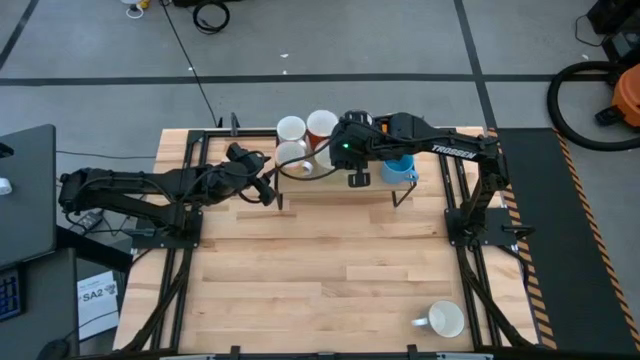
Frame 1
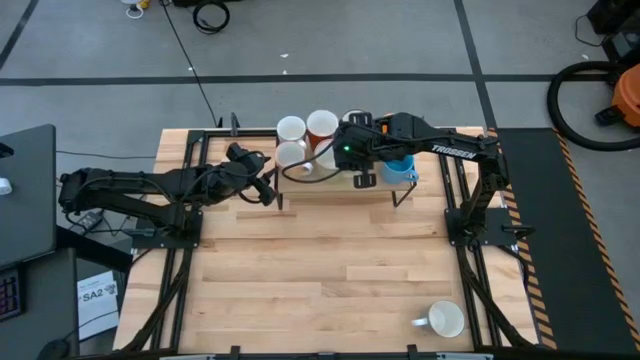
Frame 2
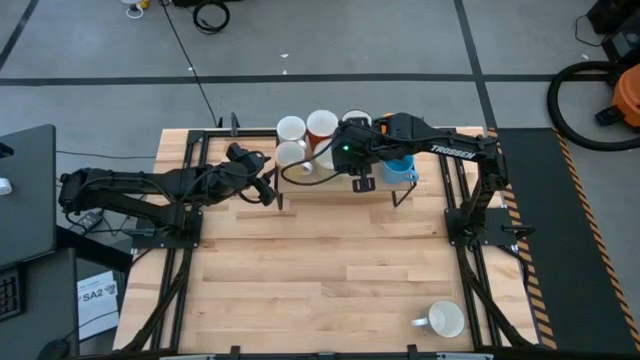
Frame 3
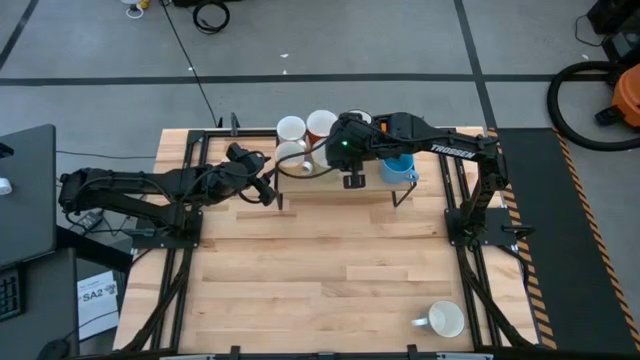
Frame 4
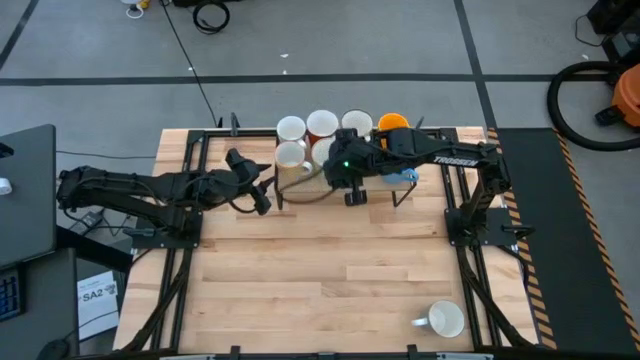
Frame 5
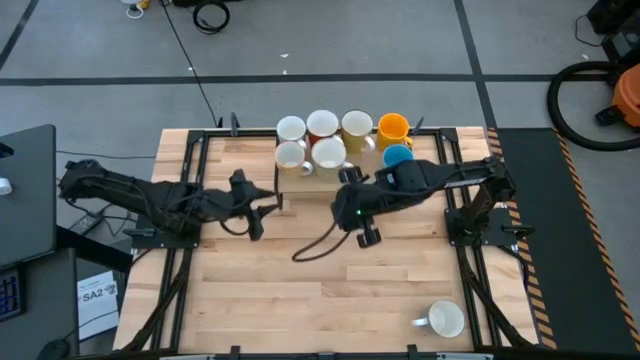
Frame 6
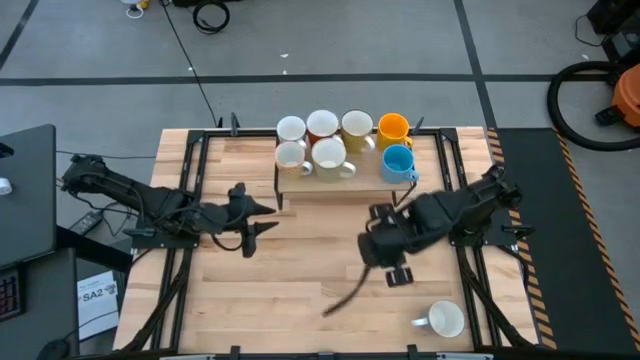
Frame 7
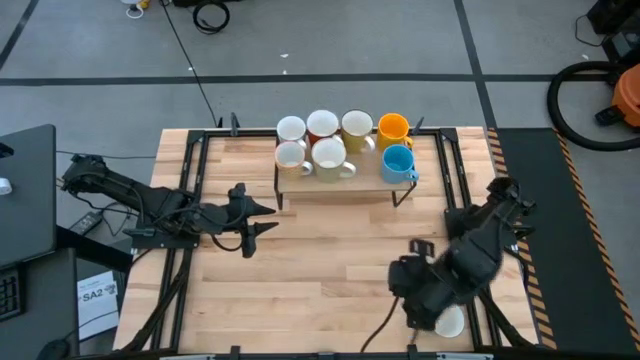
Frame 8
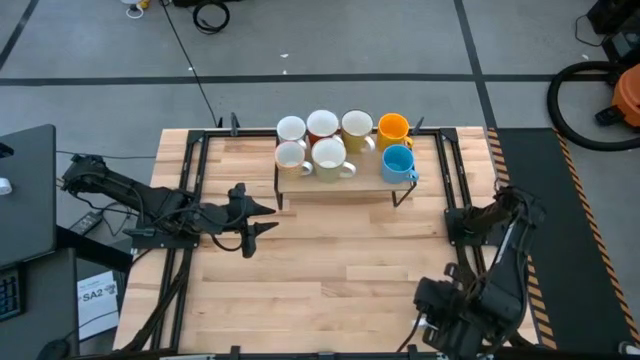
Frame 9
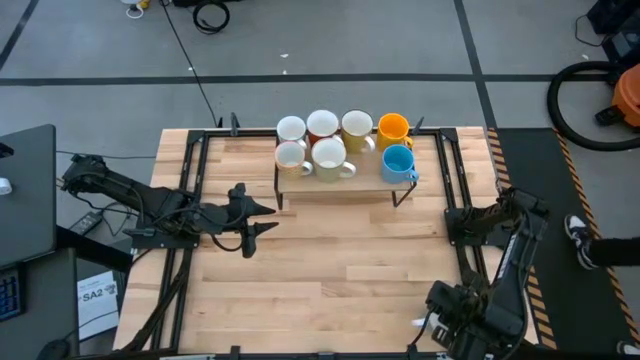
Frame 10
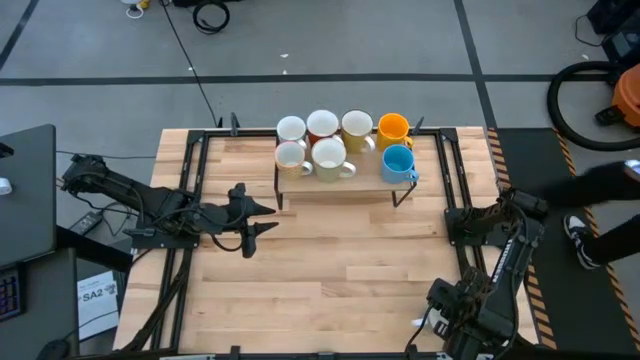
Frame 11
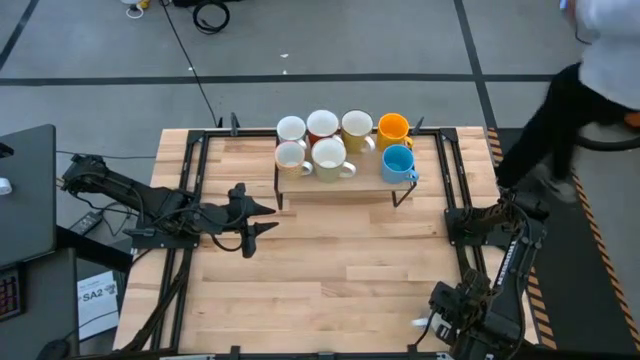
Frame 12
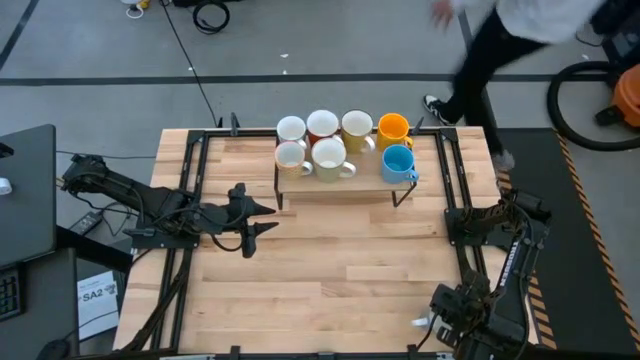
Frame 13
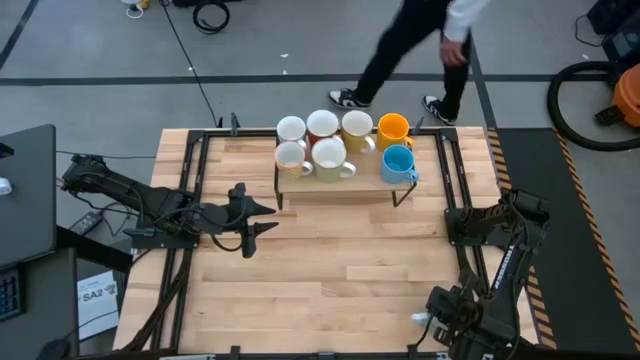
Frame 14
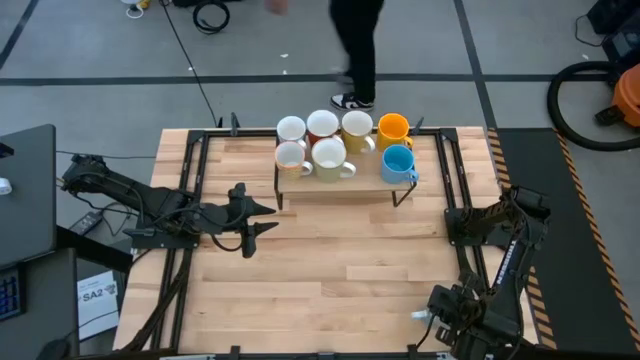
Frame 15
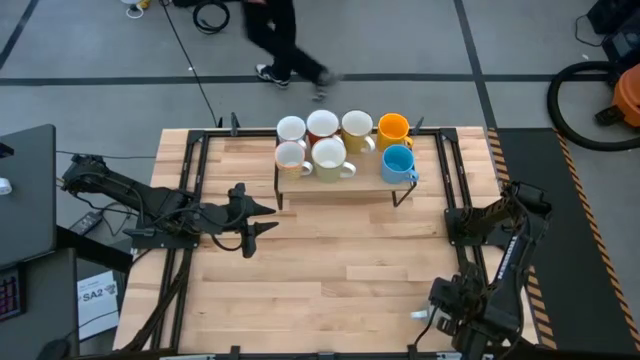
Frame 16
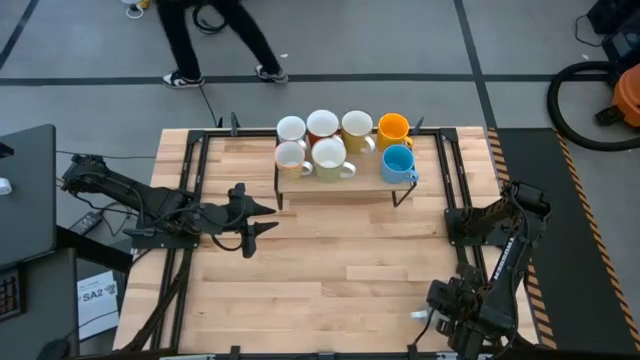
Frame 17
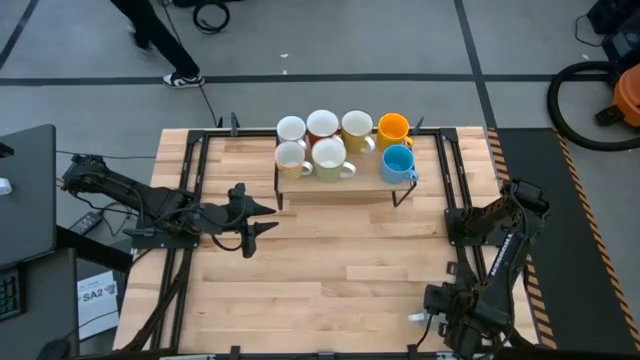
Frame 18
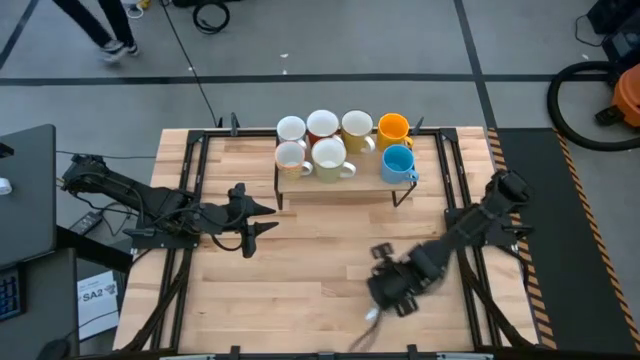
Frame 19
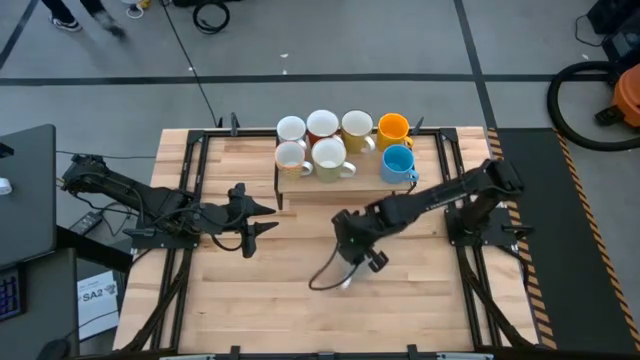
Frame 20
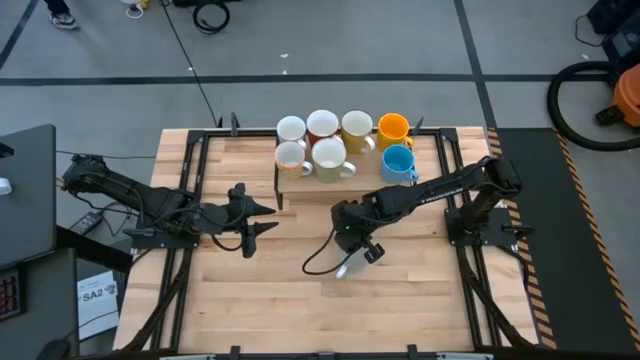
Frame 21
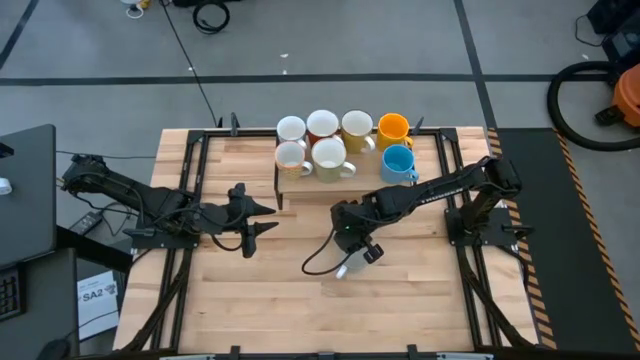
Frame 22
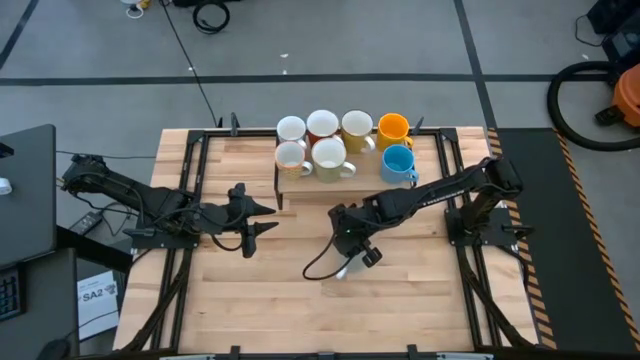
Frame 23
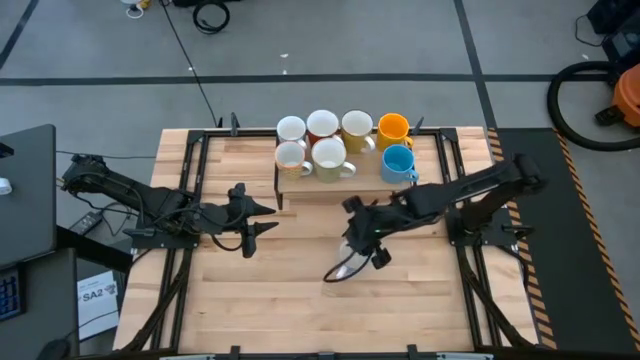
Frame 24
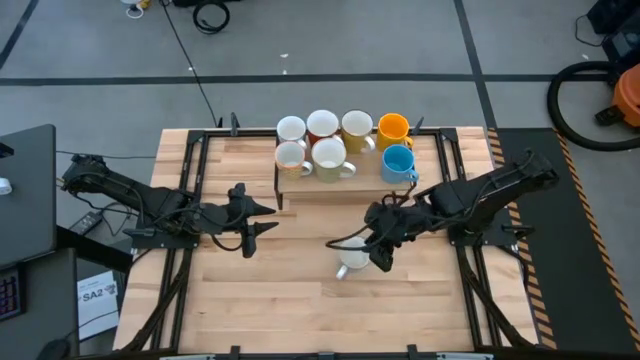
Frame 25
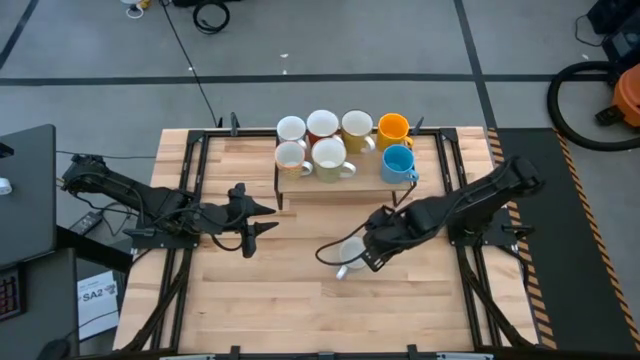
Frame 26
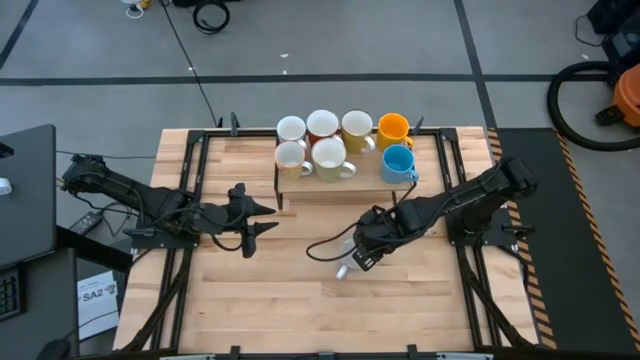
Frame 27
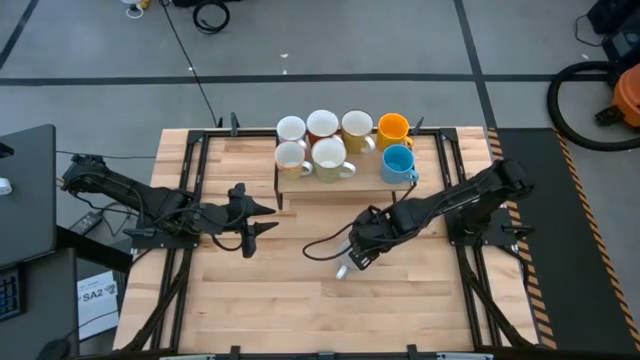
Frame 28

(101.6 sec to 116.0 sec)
Task: Place coffee mugs
Put the blue mug on the shelf

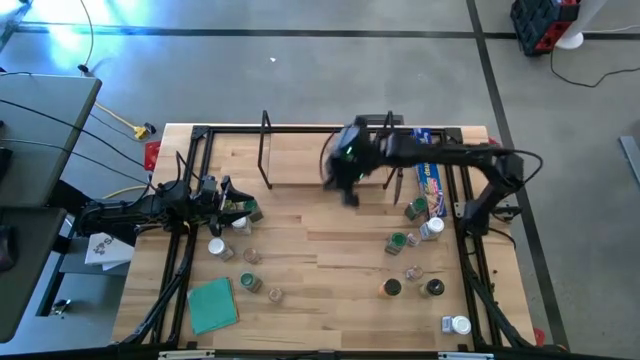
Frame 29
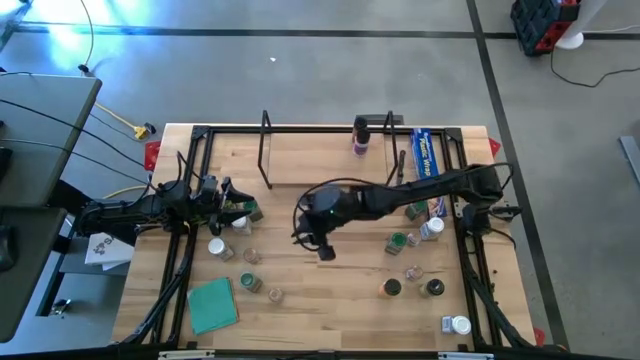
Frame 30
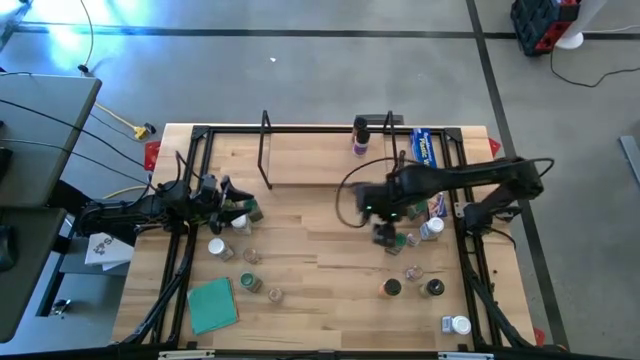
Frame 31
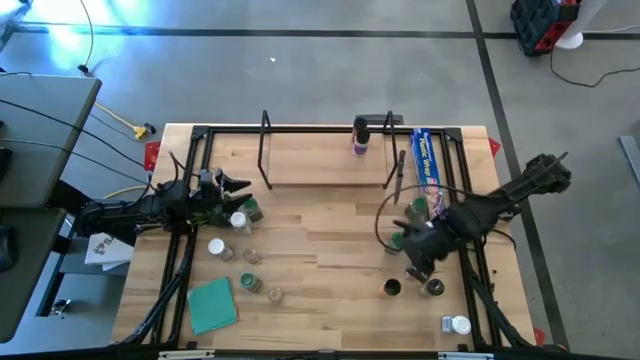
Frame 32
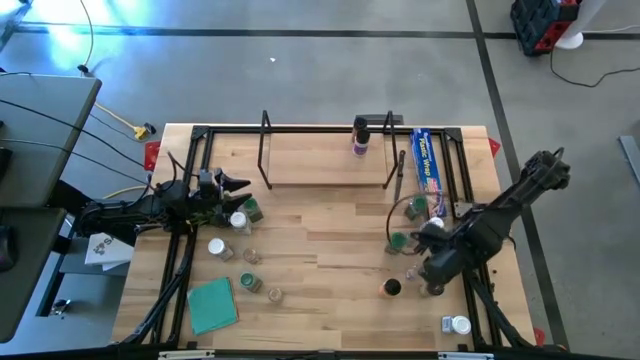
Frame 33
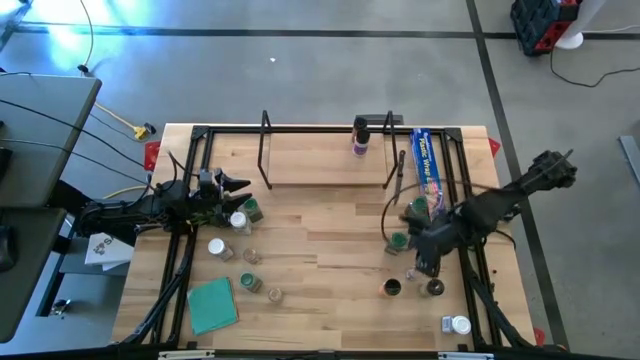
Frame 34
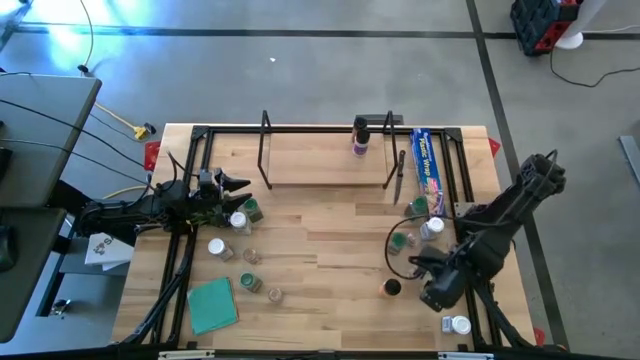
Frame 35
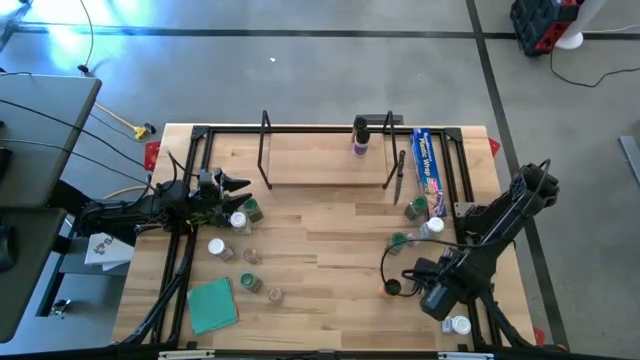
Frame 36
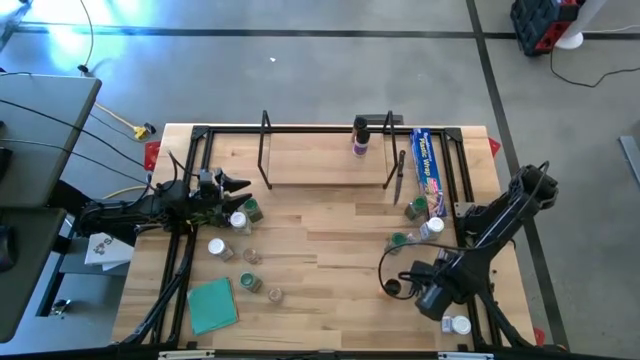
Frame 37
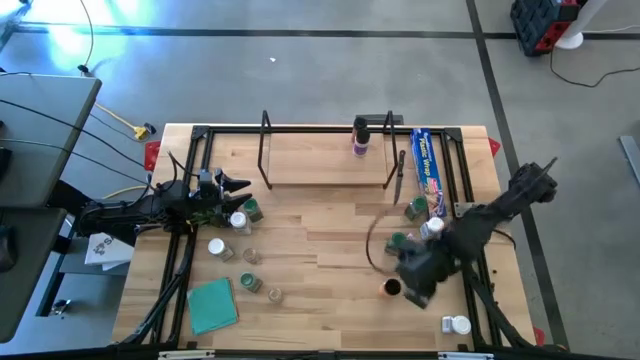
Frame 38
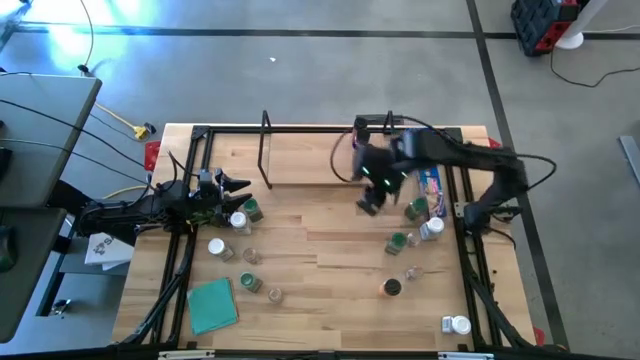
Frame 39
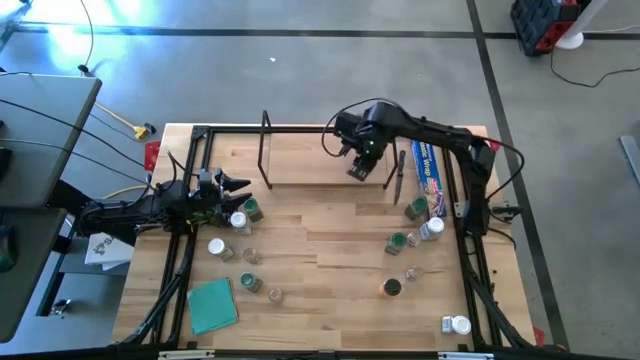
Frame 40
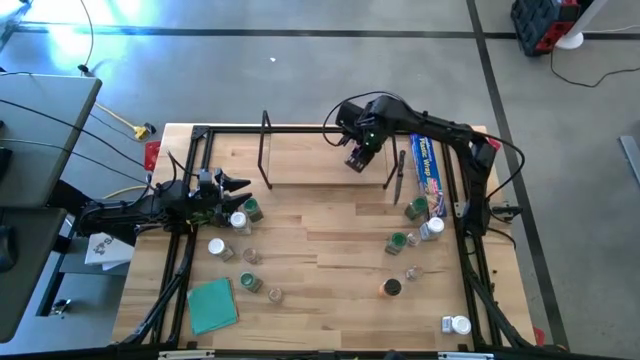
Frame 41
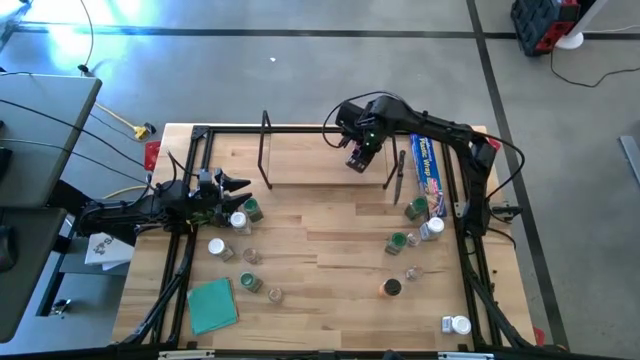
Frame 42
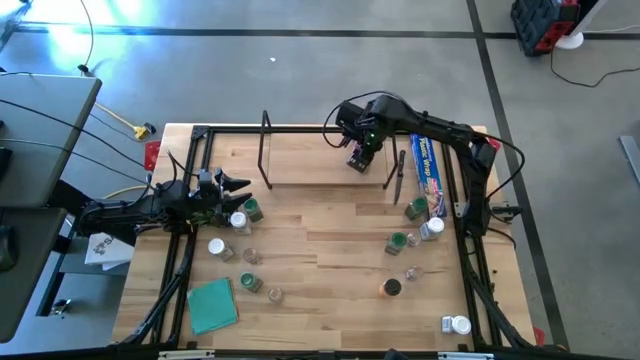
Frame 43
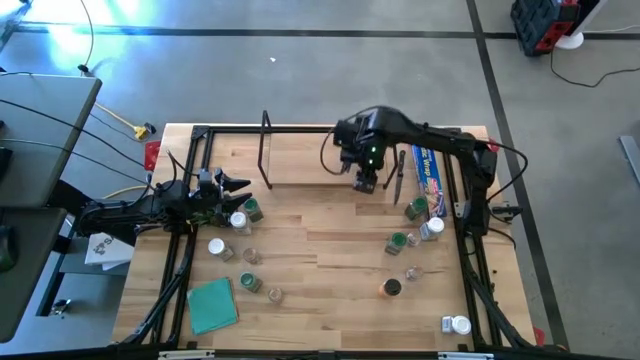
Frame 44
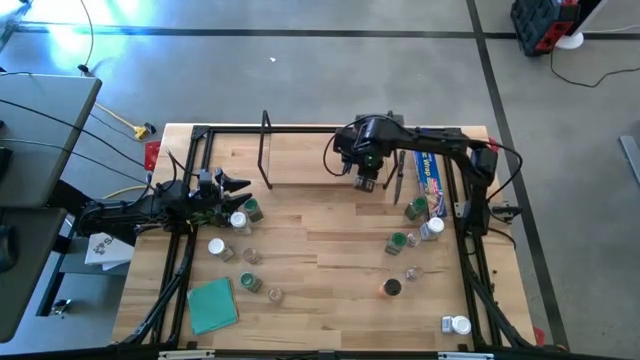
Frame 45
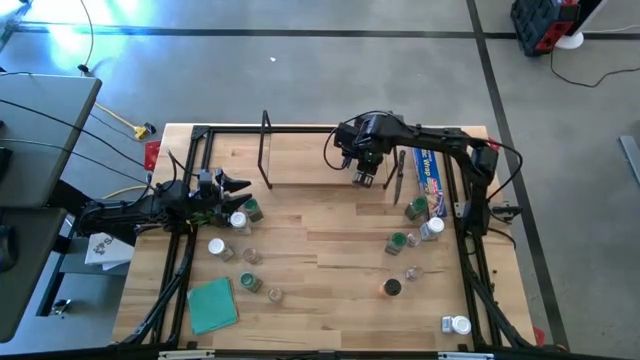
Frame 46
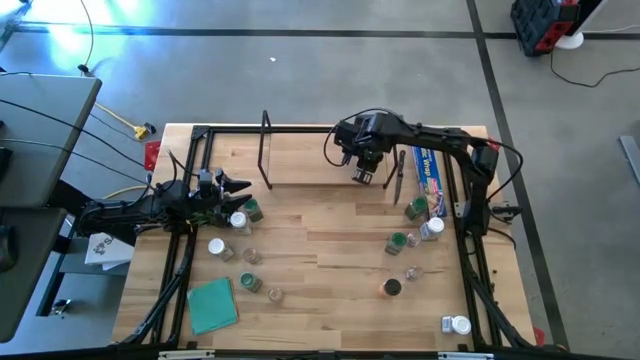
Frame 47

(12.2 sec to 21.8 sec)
Task: Shelf spices
Put the black green seasoning bottle on the shelf
